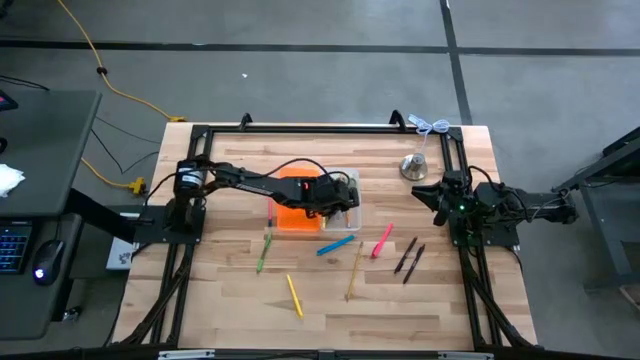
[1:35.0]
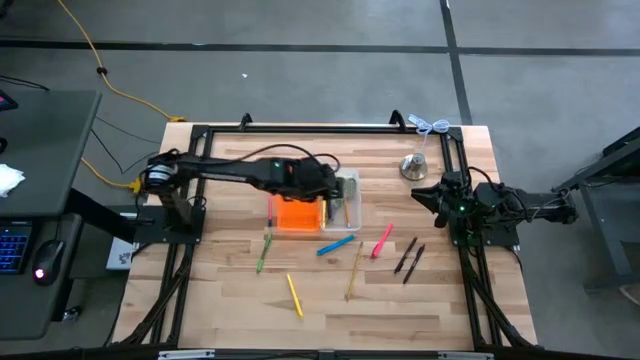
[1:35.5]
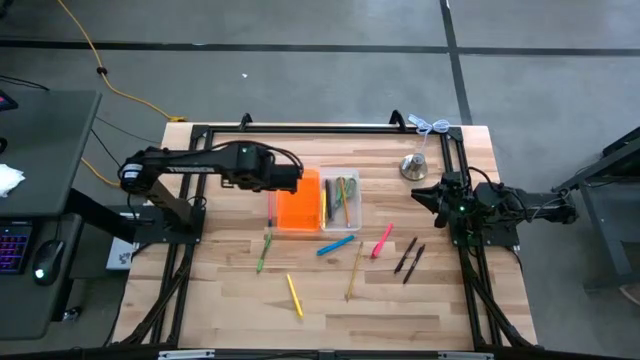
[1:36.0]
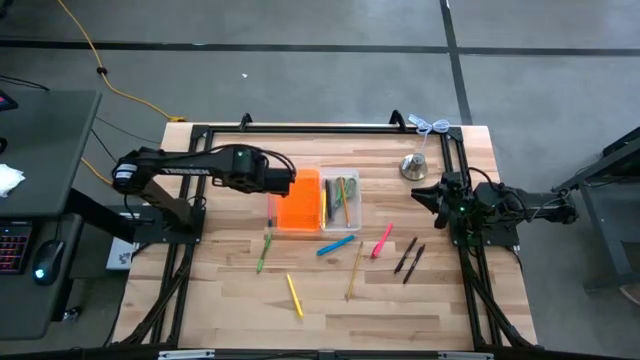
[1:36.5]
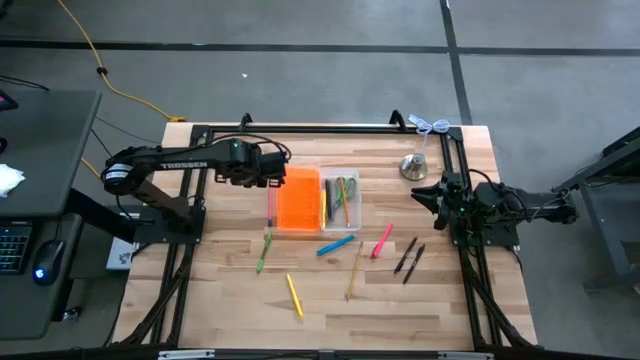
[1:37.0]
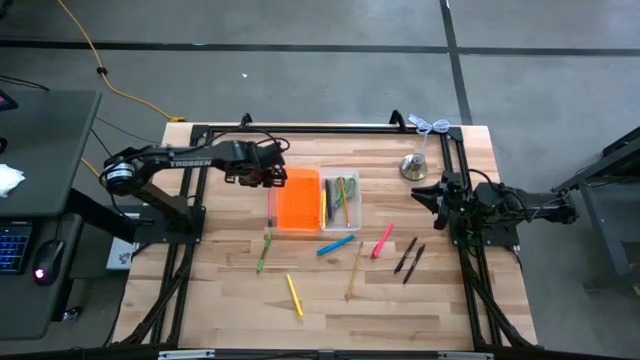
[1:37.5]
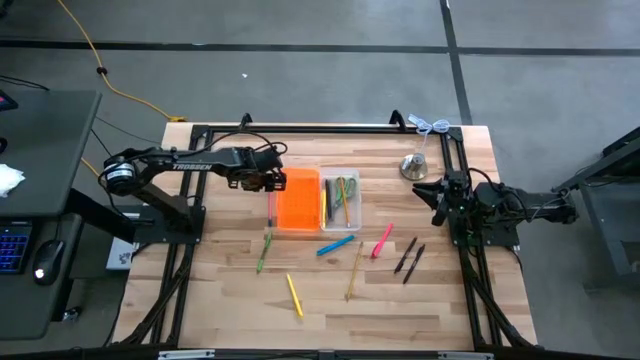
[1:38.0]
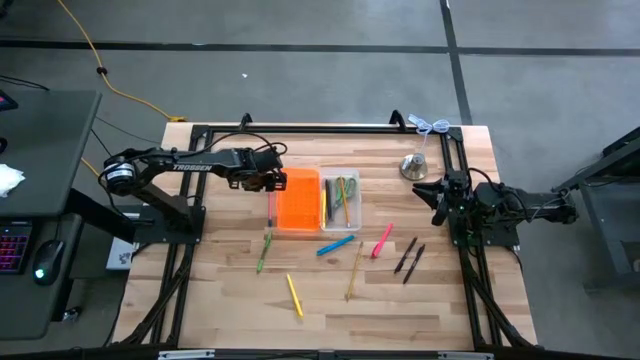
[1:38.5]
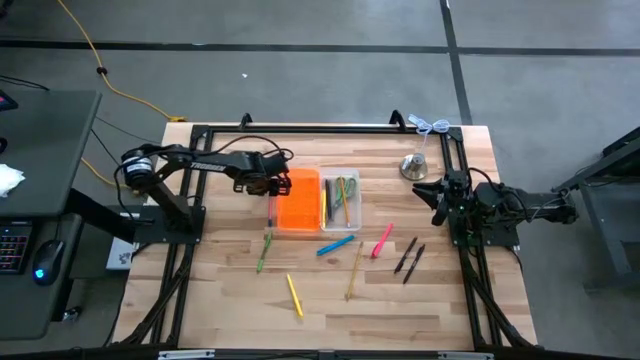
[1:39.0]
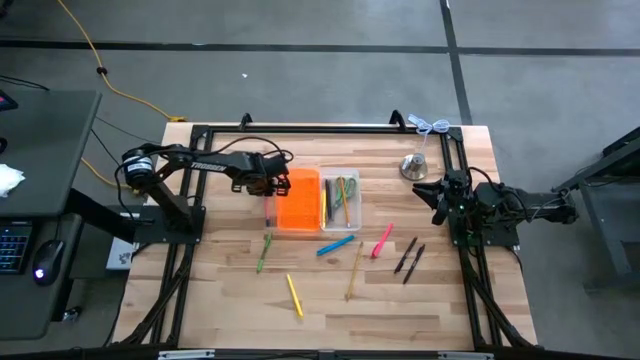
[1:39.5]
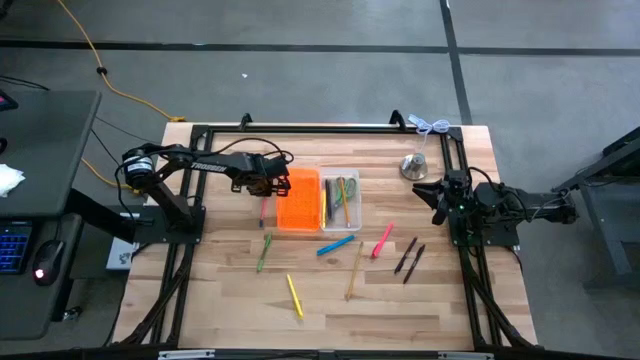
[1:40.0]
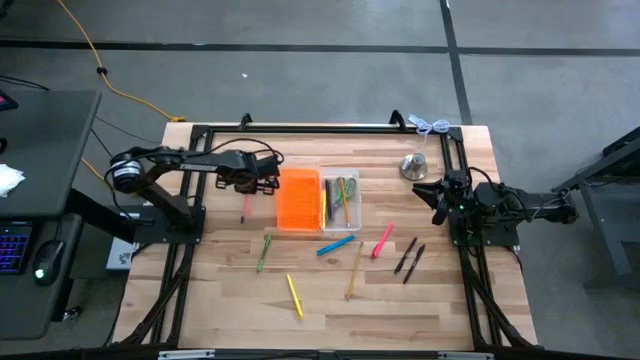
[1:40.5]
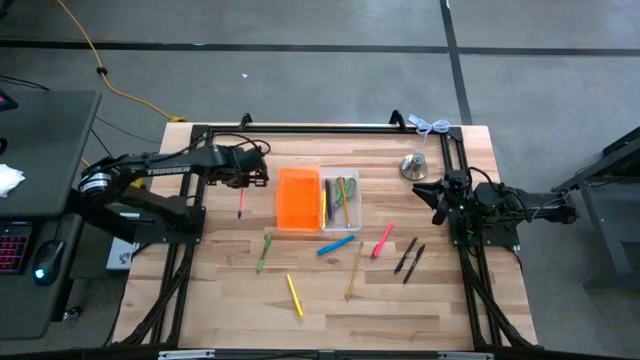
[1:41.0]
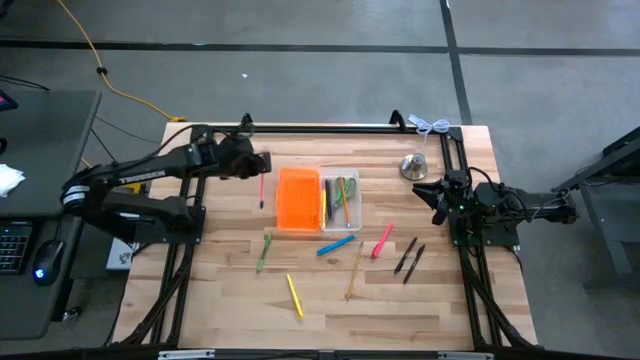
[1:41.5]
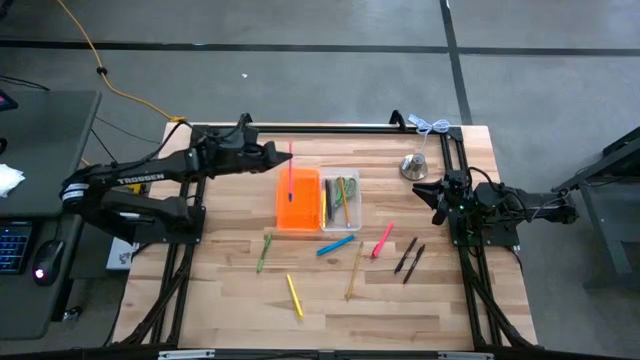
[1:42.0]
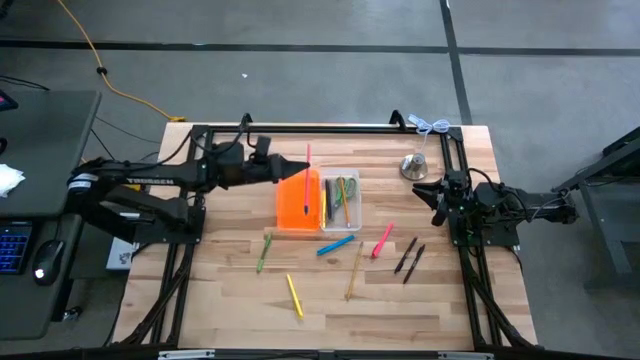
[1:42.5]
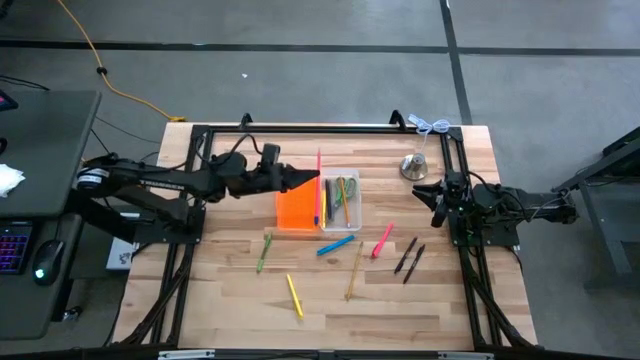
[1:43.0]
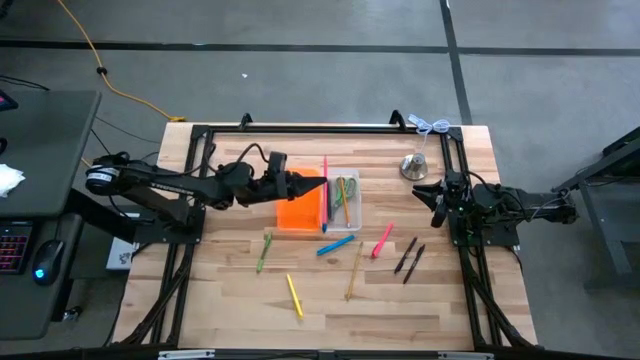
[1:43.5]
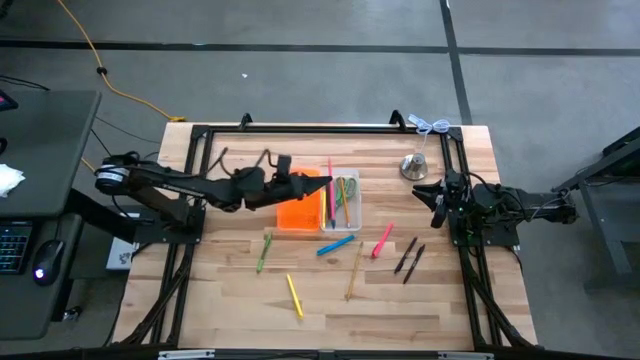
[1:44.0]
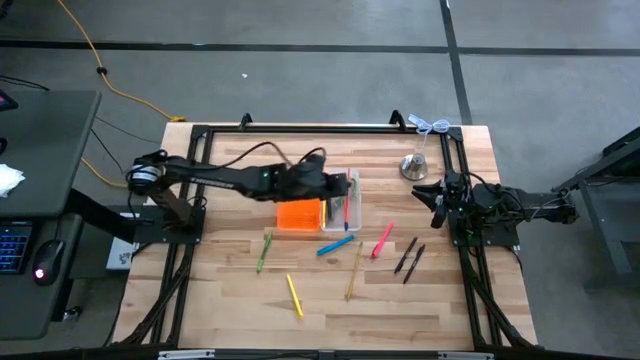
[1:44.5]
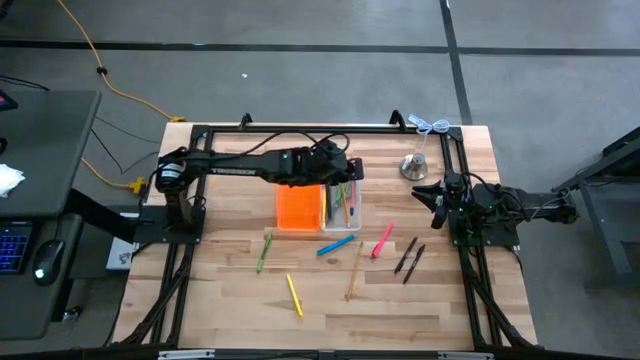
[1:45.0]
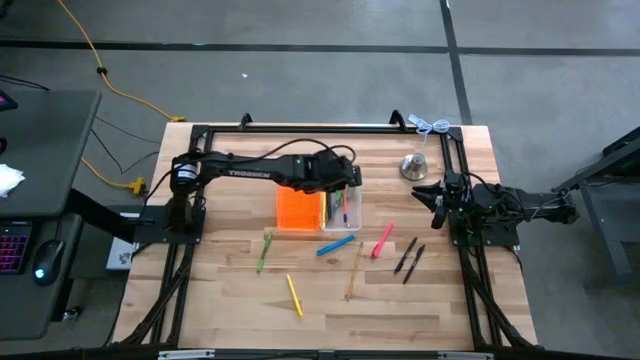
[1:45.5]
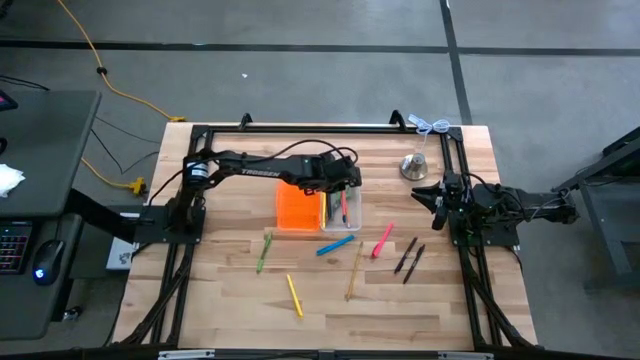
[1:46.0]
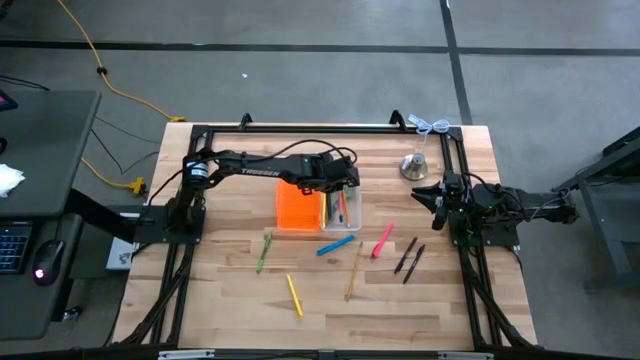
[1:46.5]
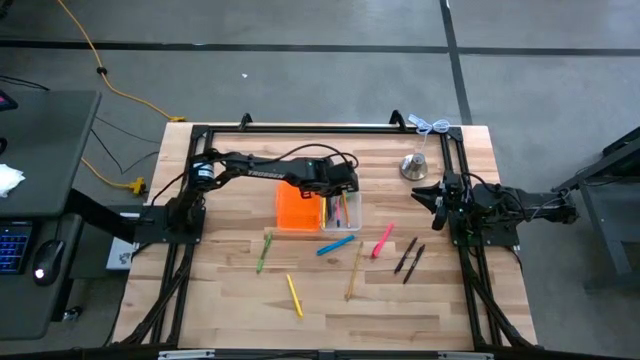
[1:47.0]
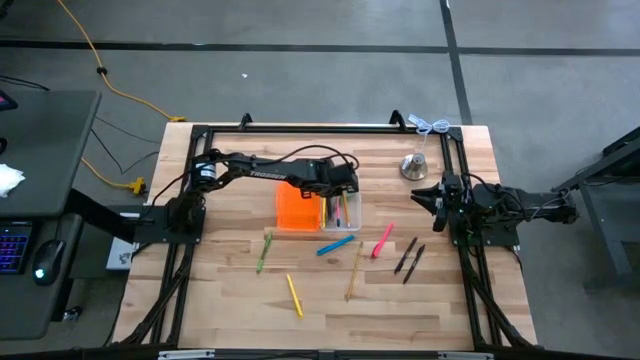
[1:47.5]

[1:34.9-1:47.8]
Task: Pick & place school supplies into a supply box
Put the pink pencil into the supply box

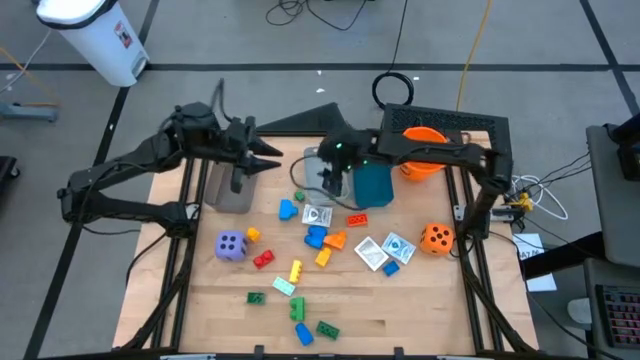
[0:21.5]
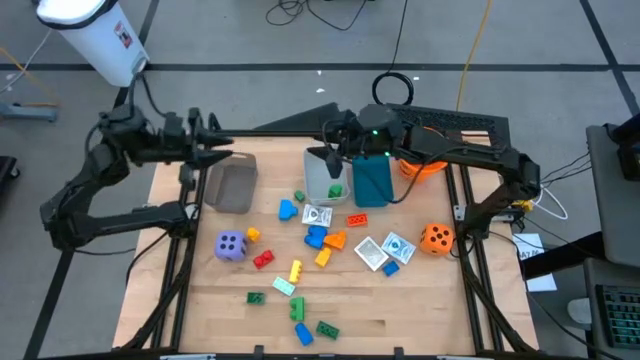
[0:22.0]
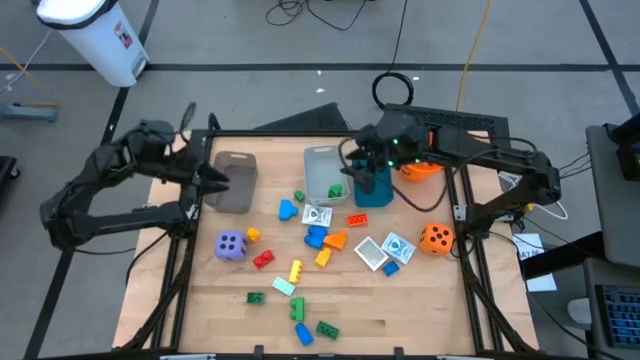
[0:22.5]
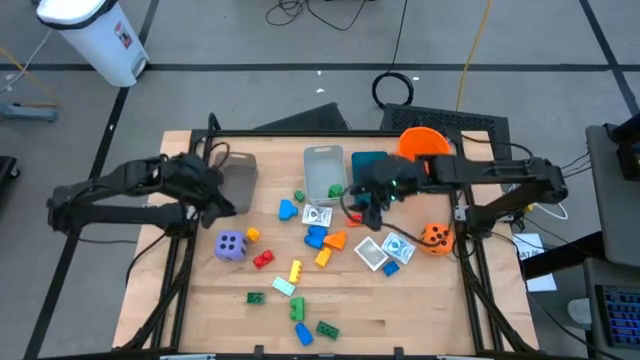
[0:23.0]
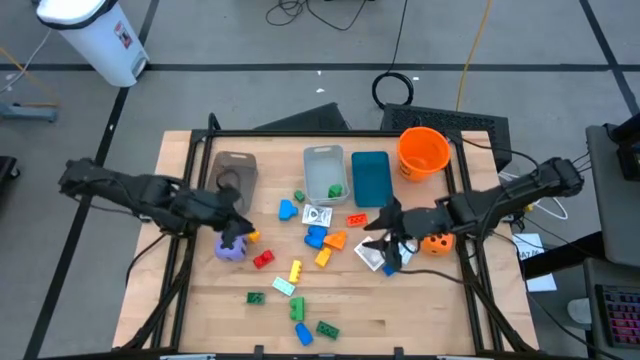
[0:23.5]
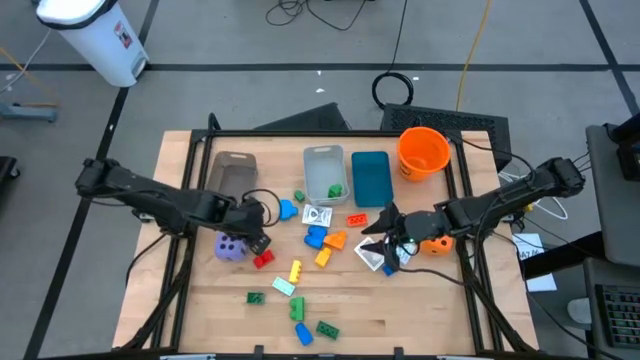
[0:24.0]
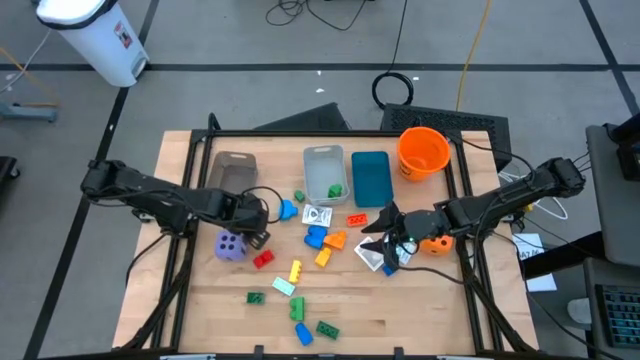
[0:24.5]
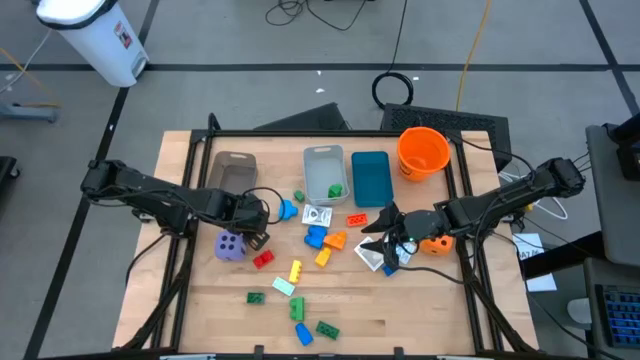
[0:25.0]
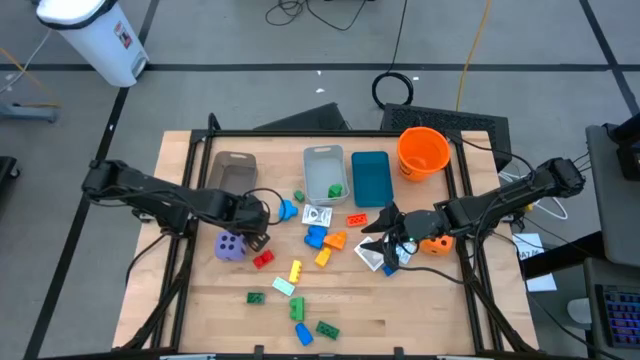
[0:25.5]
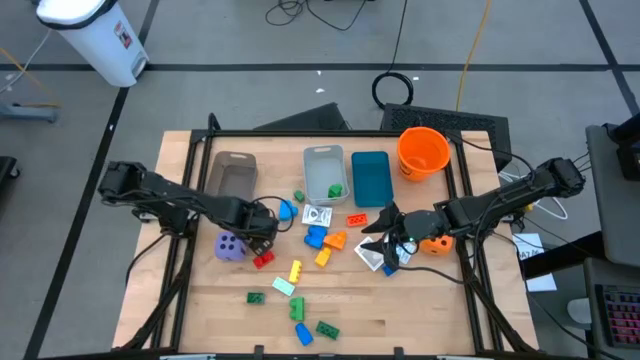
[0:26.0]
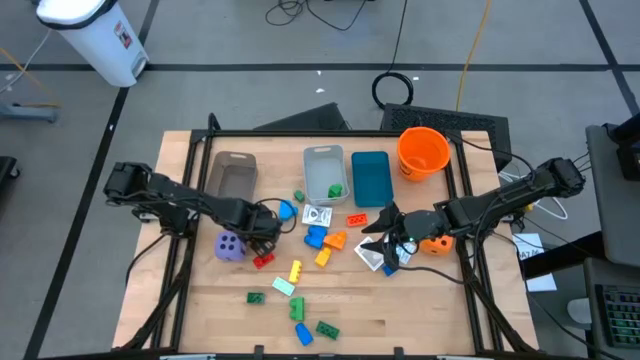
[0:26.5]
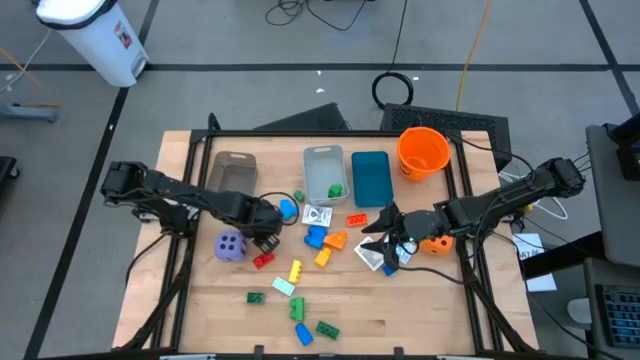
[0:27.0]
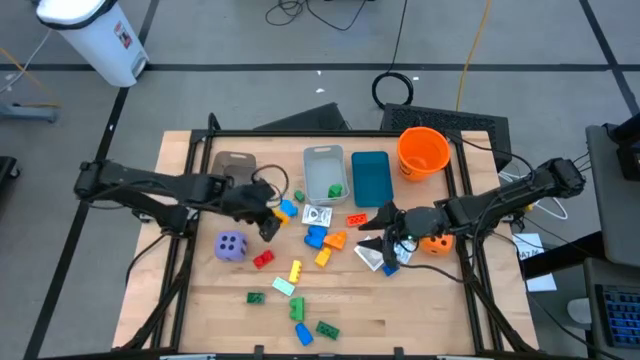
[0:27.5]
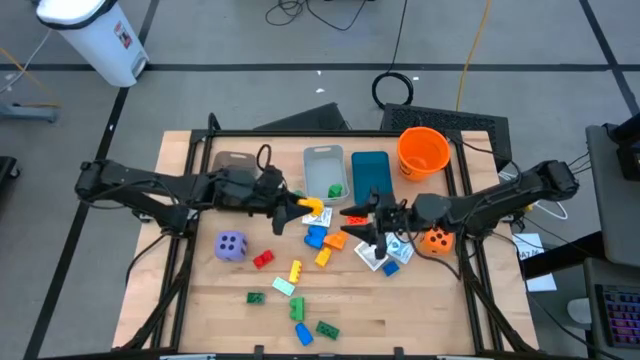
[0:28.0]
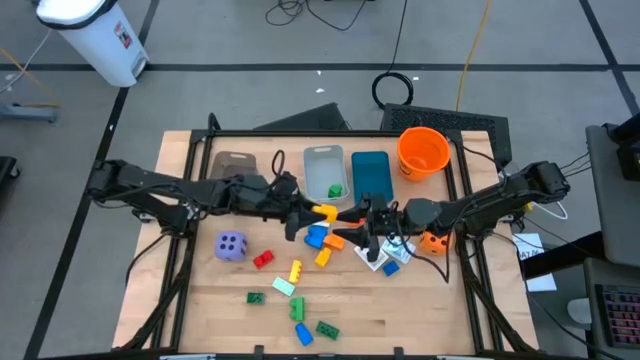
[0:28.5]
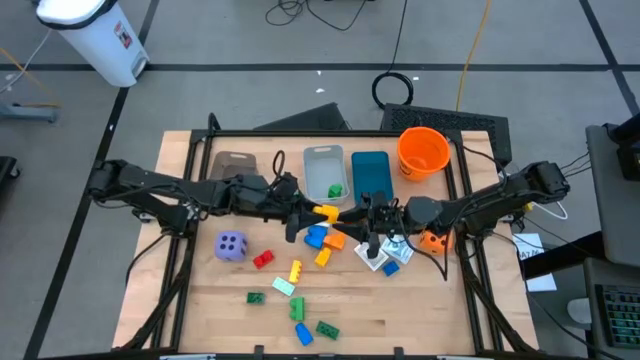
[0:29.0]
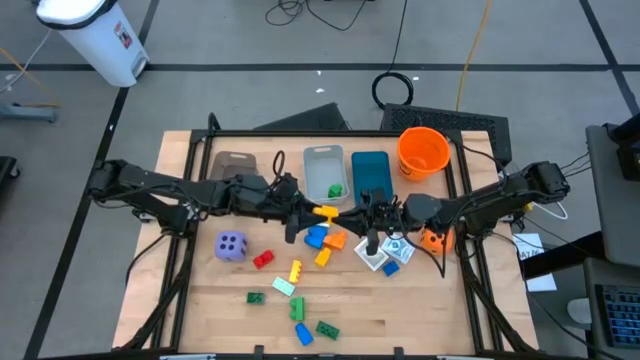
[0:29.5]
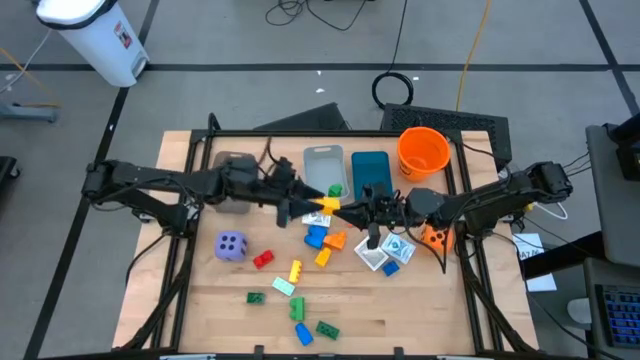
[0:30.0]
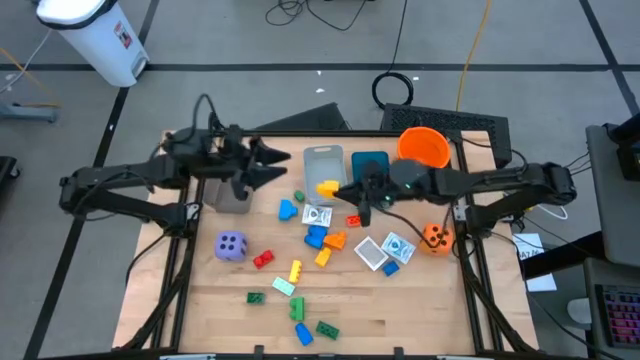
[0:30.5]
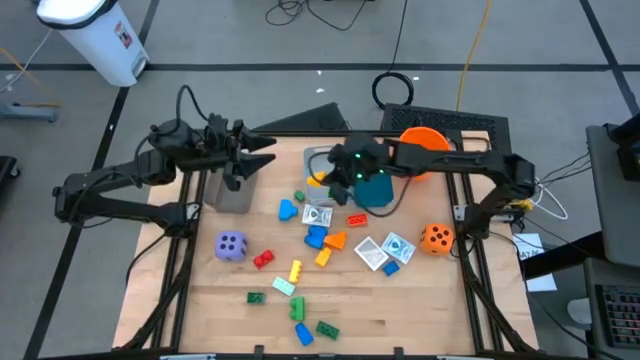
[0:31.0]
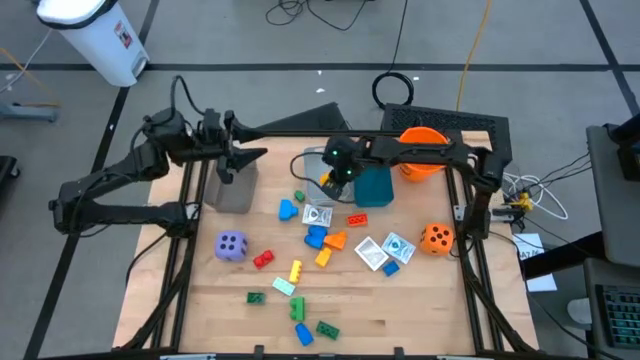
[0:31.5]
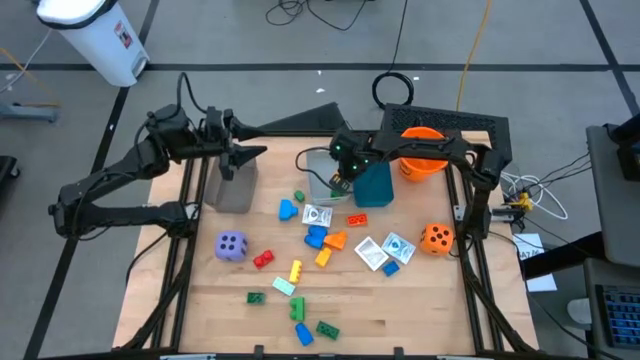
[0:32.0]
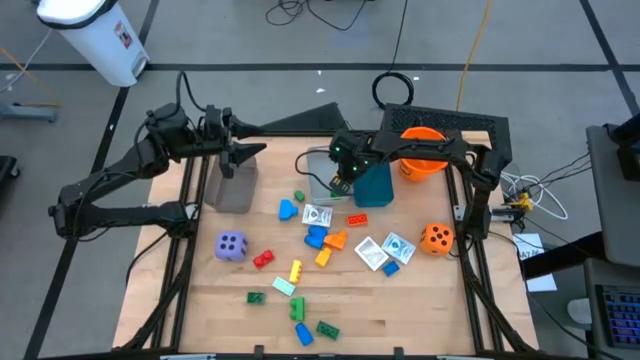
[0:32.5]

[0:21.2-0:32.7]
Task: Pick & Place Toys
Put the yellow game piece into the gray bin
